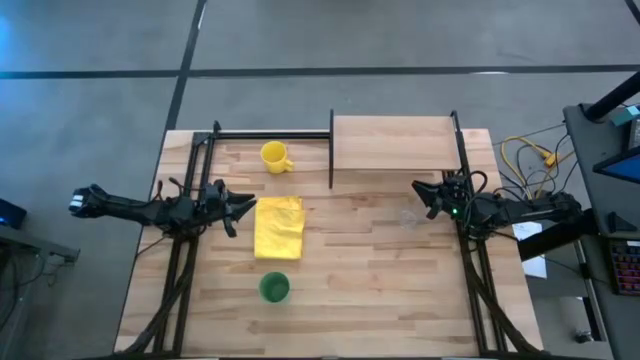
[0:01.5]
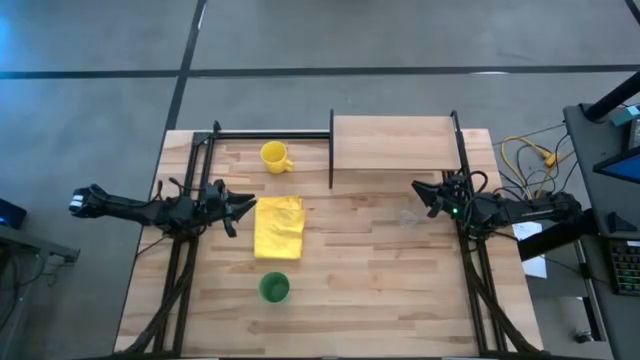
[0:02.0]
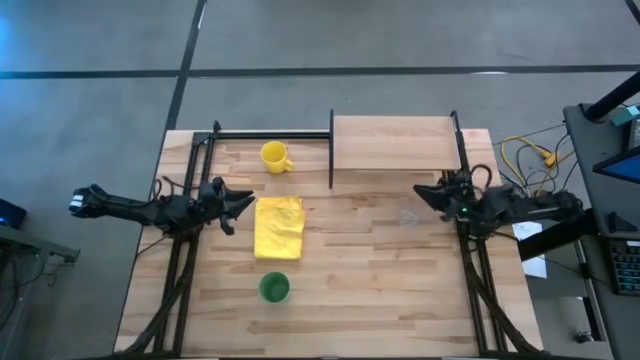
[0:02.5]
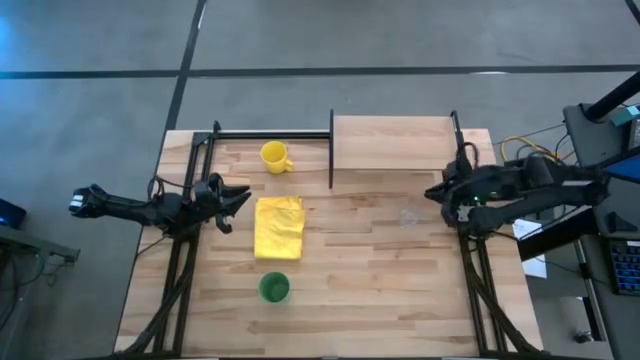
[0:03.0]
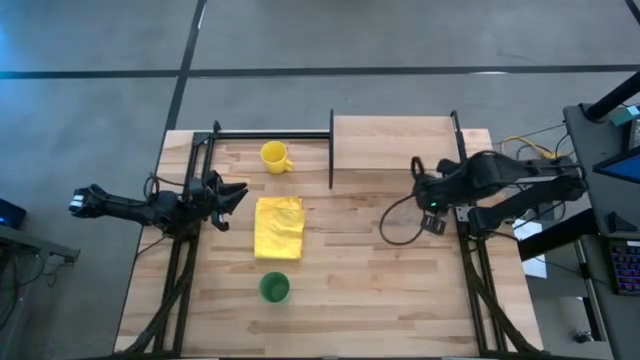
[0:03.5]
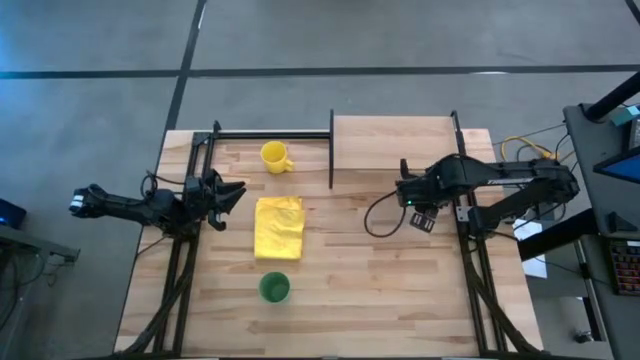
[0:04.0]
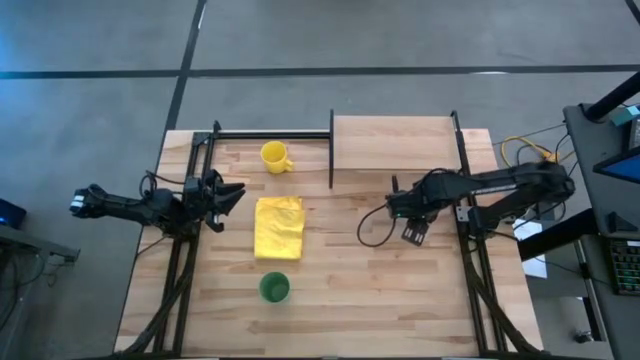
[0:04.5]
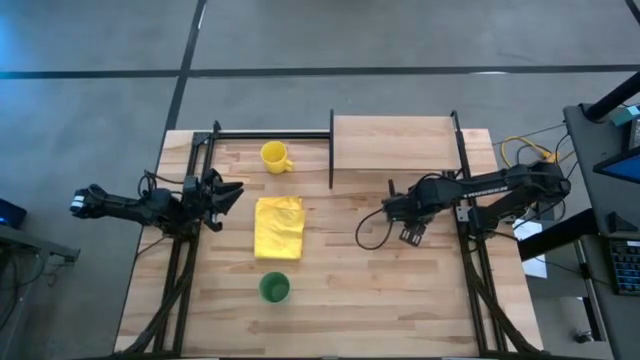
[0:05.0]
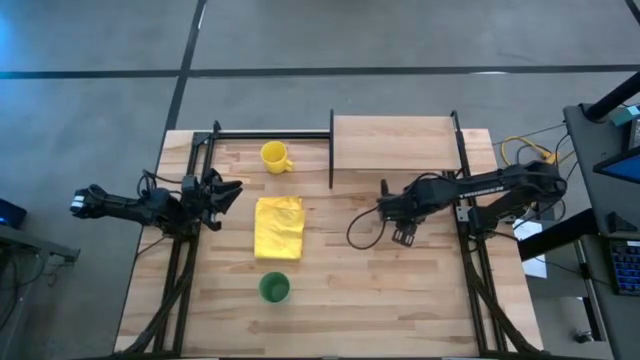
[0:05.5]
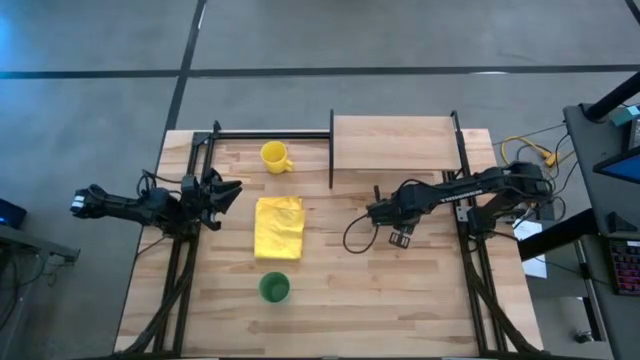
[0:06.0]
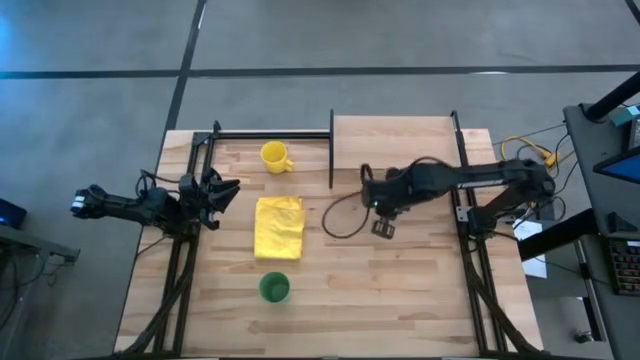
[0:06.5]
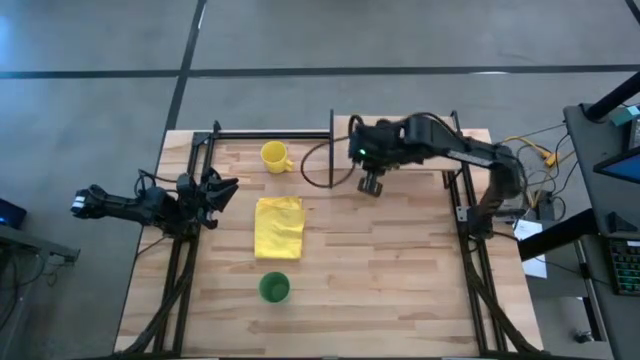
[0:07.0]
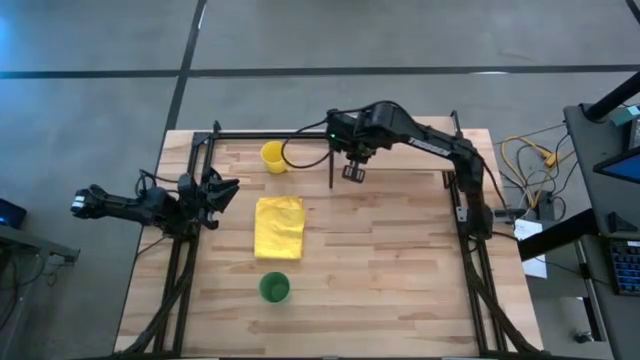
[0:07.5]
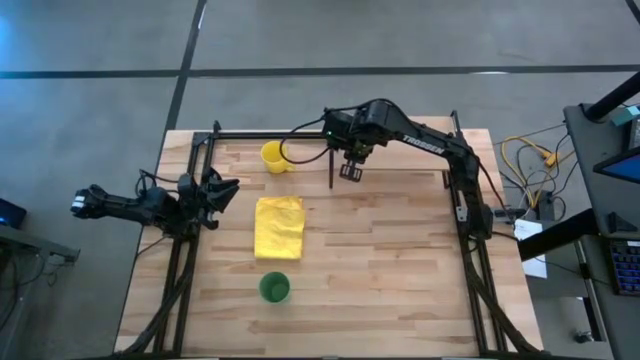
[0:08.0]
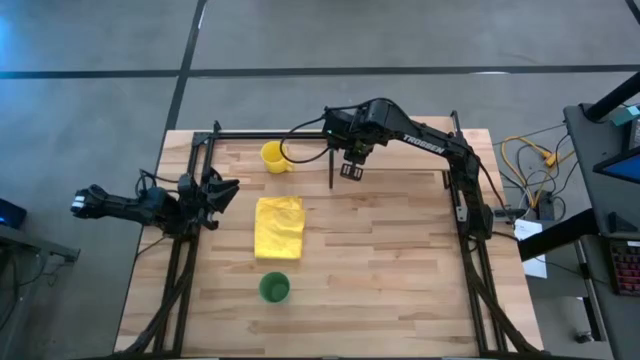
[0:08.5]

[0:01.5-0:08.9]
Task: Stack small to large cups/mugs on shelf
Put the transparent mug on the shelf

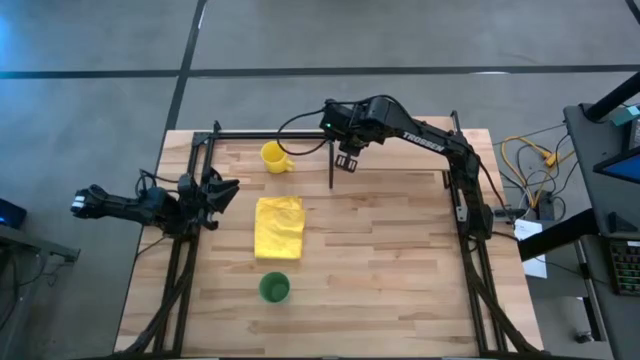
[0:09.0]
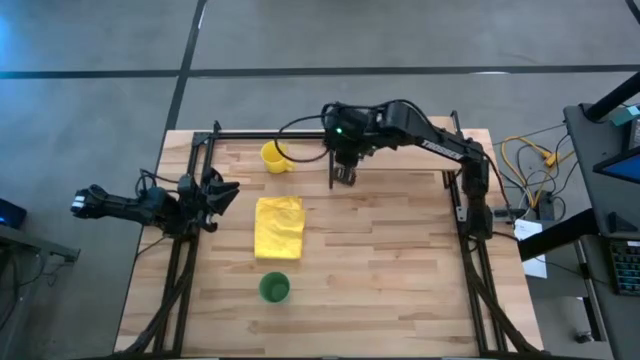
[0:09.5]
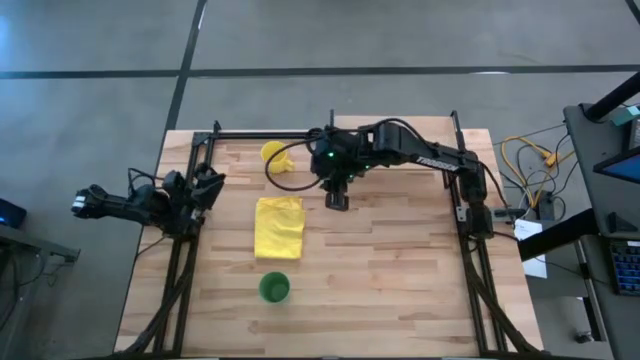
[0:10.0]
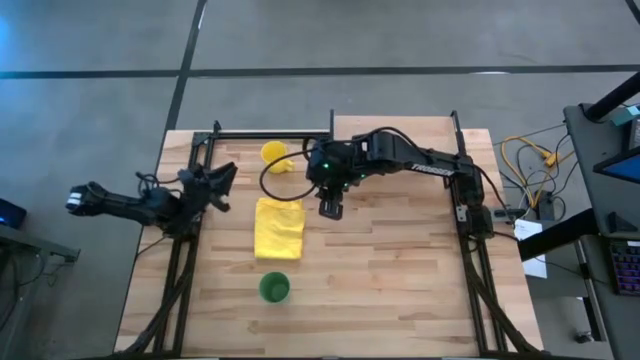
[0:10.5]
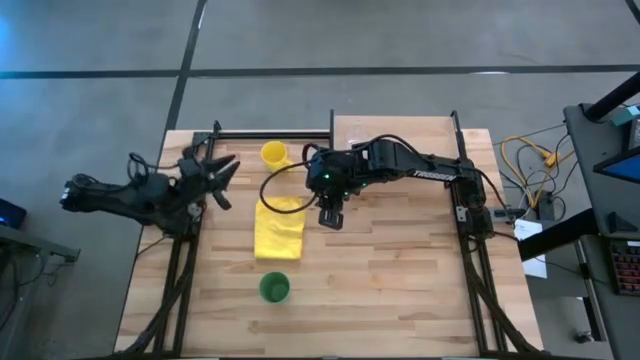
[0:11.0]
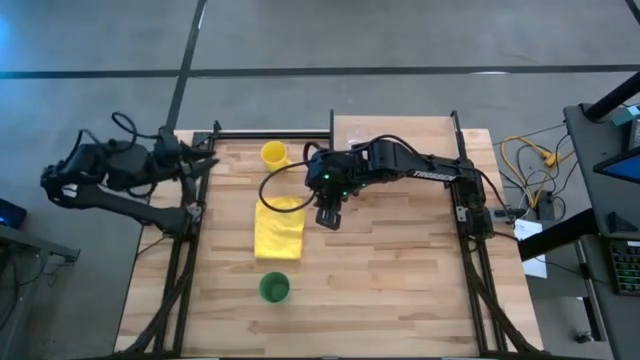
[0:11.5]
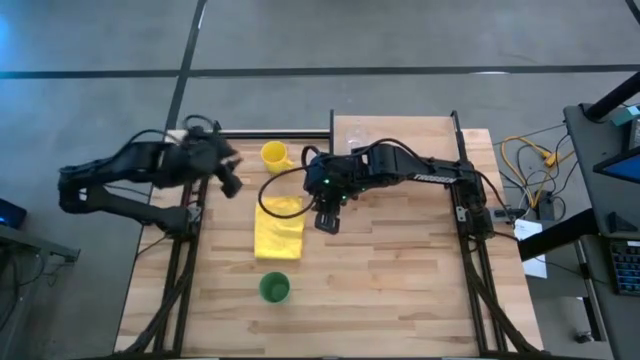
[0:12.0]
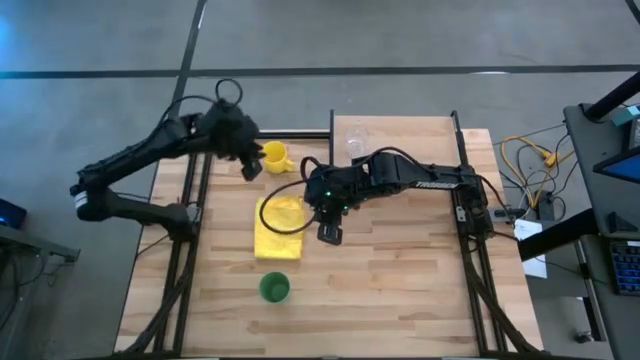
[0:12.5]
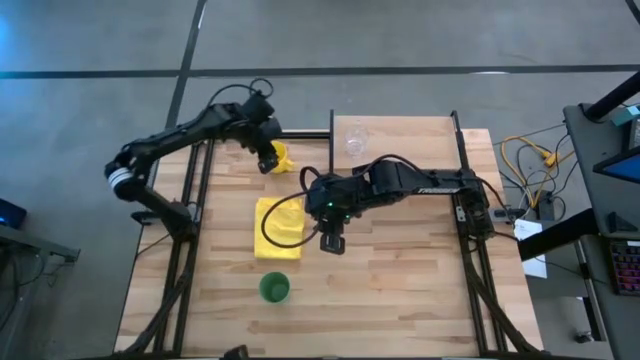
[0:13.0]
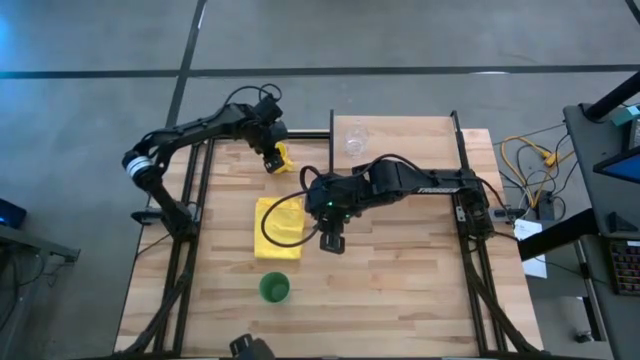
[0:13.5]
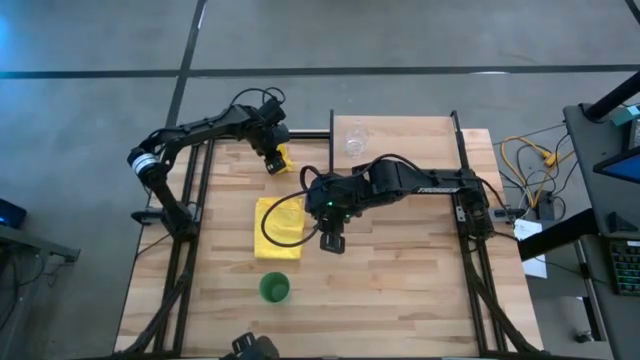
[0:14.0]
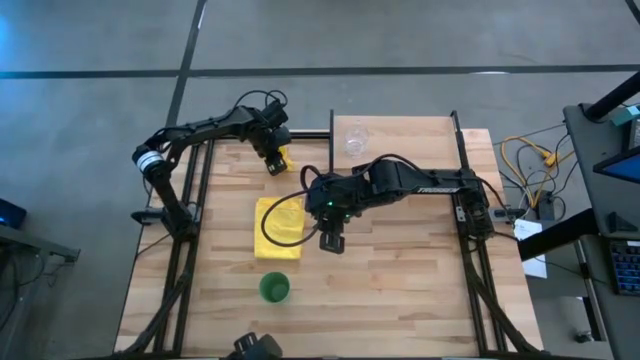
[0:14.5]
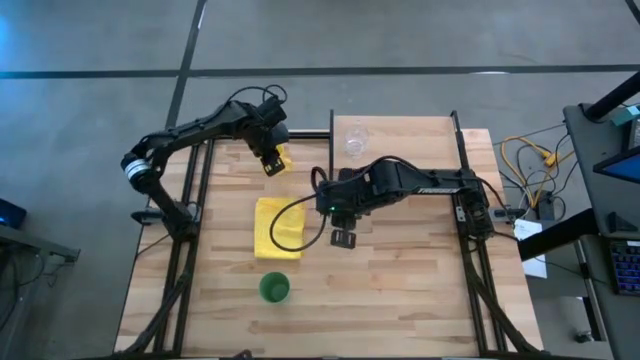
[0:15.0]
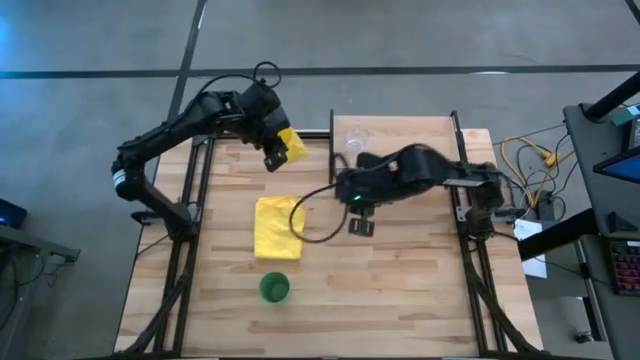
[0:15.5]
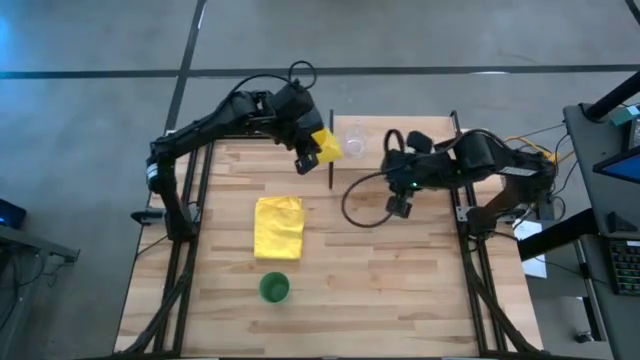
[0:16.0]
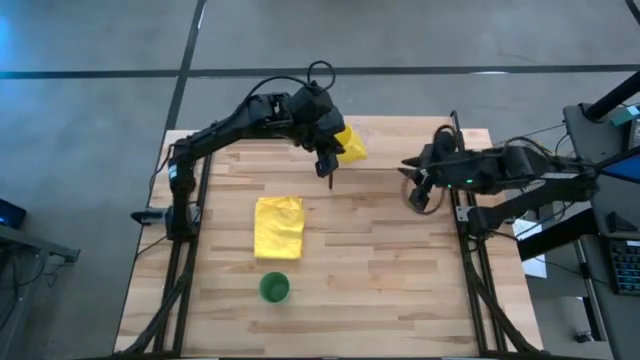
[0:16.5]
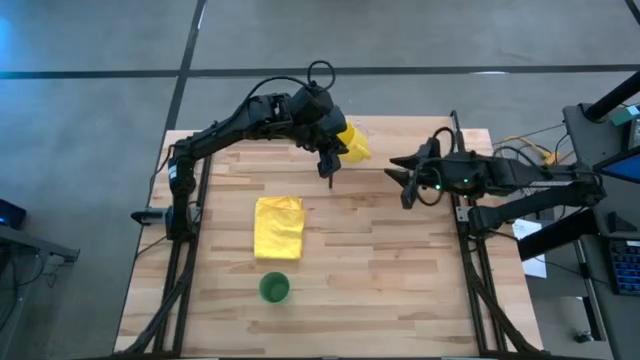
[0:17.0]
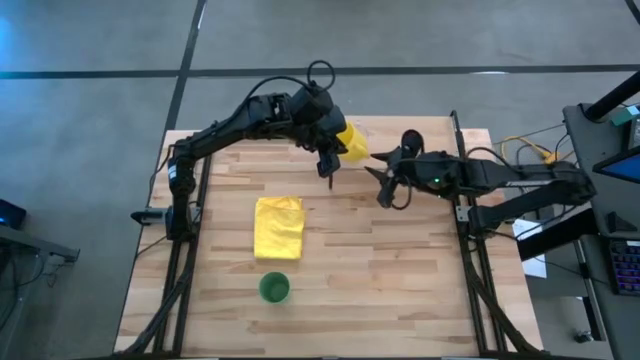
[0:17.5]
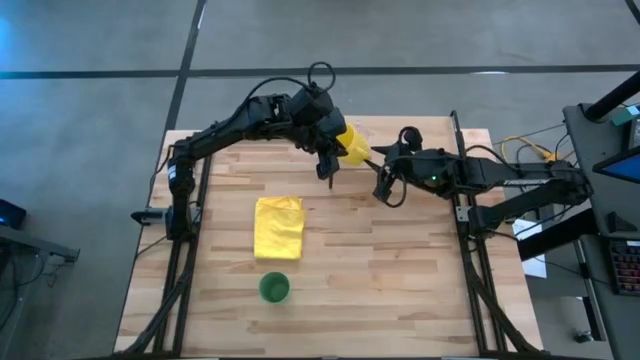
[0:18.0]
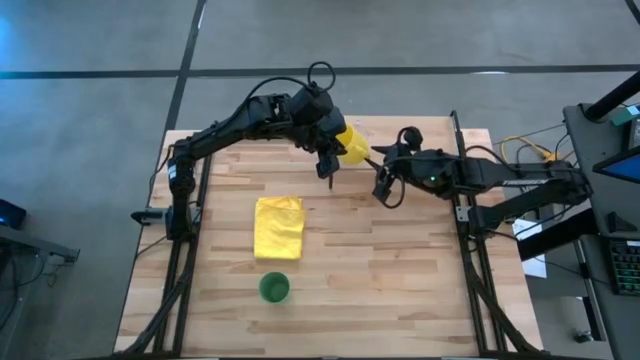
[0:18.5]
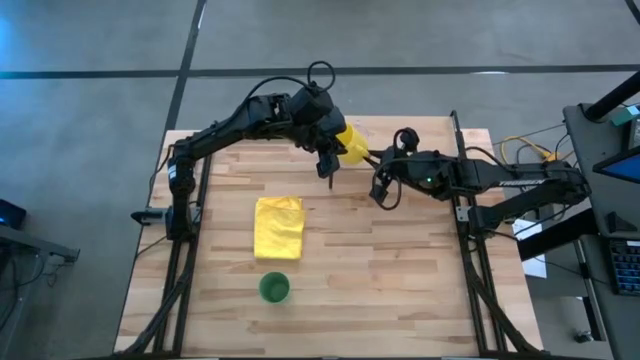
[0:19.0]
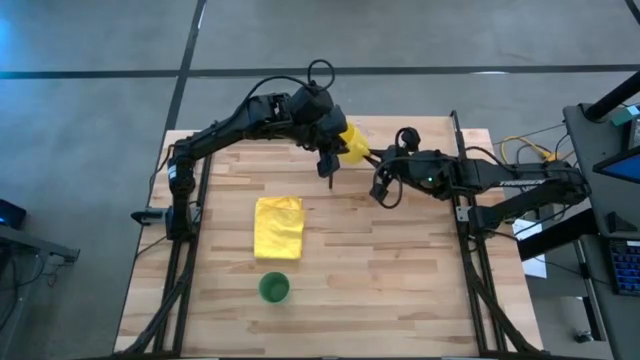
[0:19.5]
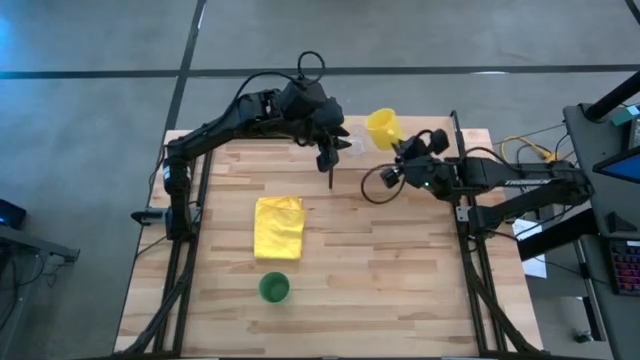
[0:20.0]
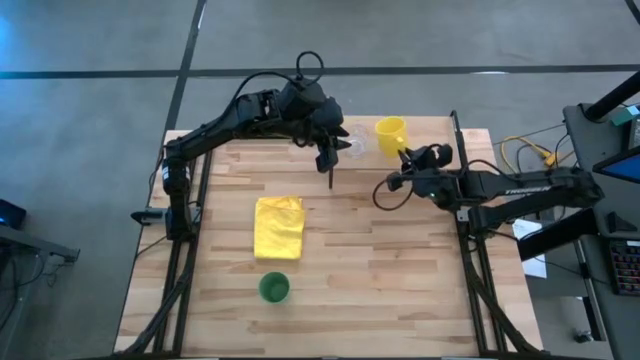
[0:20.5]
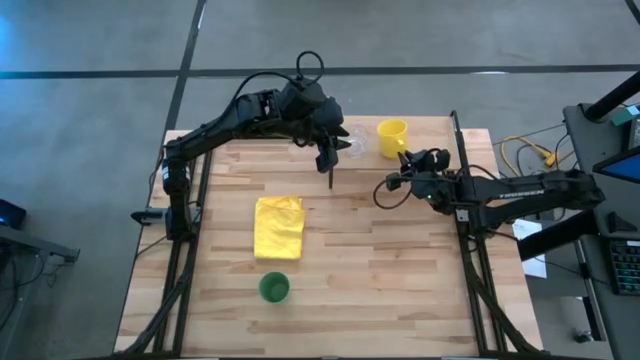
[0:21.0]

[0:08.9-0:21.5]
Put the yellow mug on the shelf
